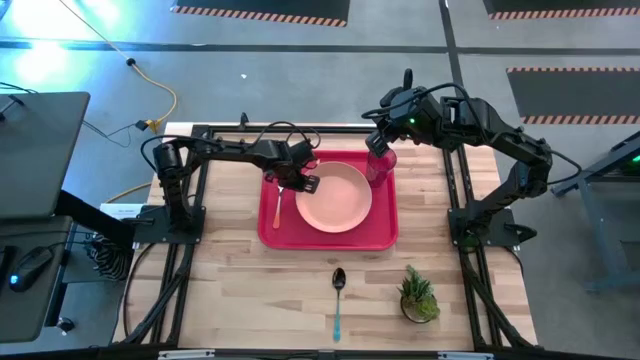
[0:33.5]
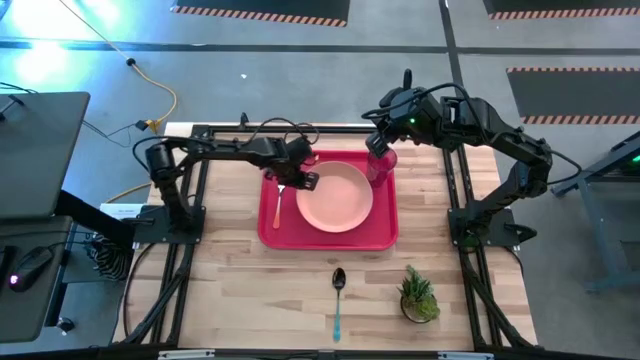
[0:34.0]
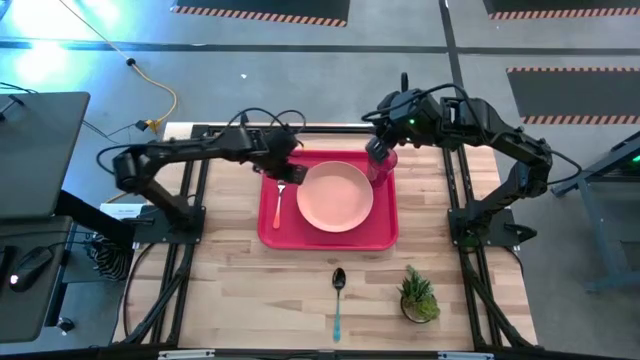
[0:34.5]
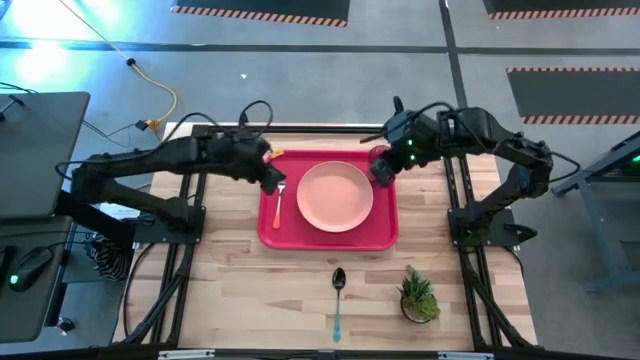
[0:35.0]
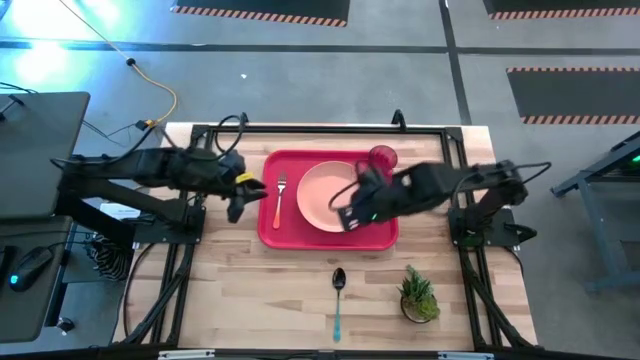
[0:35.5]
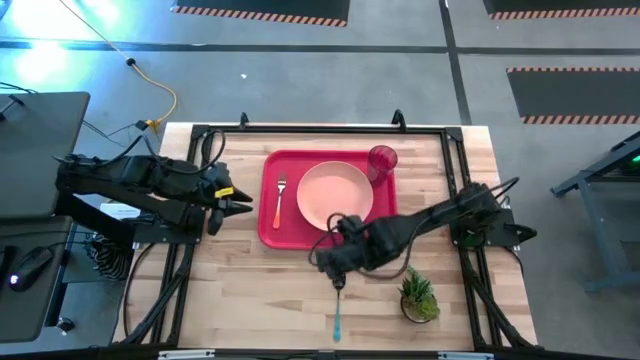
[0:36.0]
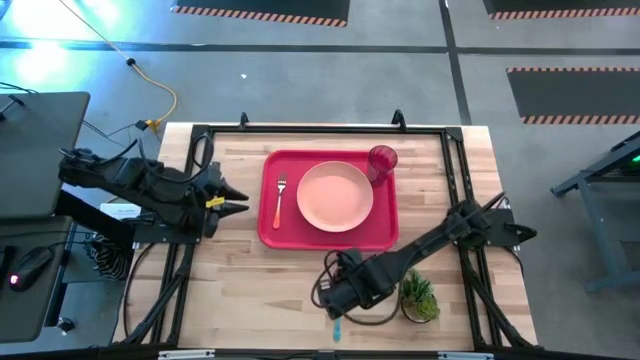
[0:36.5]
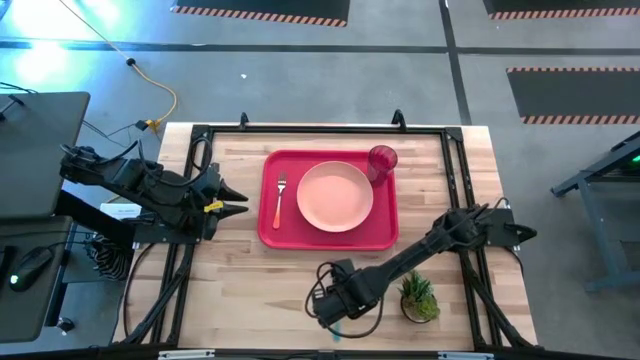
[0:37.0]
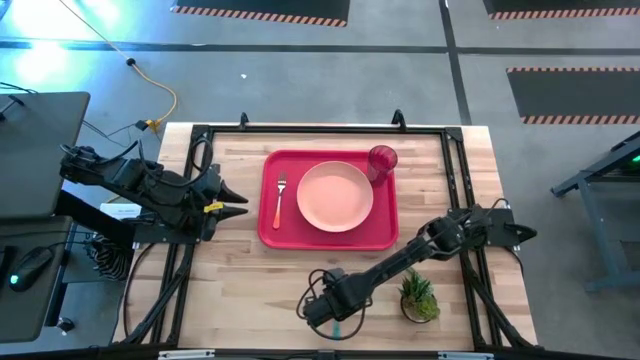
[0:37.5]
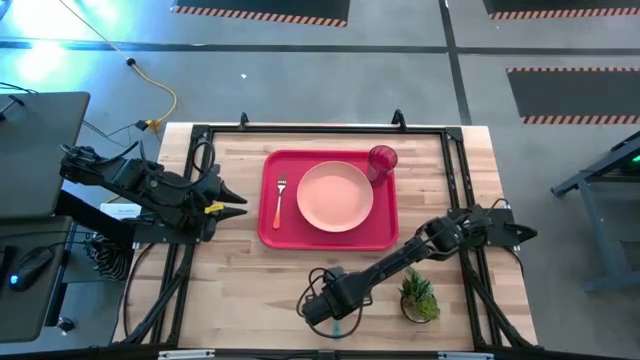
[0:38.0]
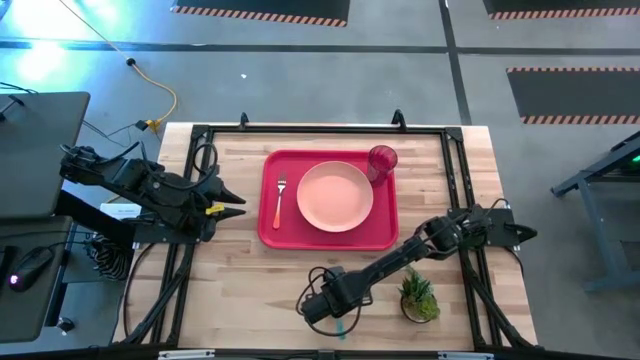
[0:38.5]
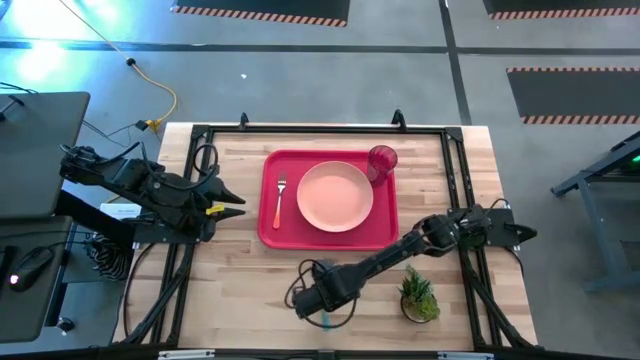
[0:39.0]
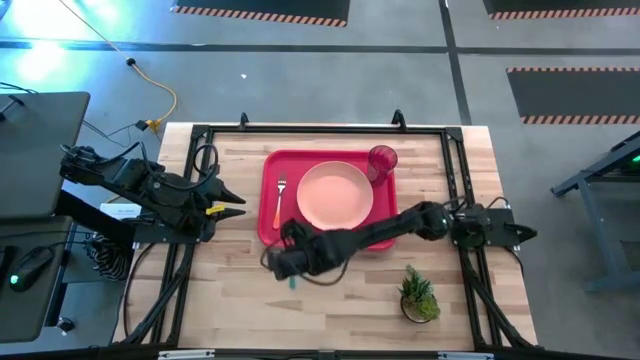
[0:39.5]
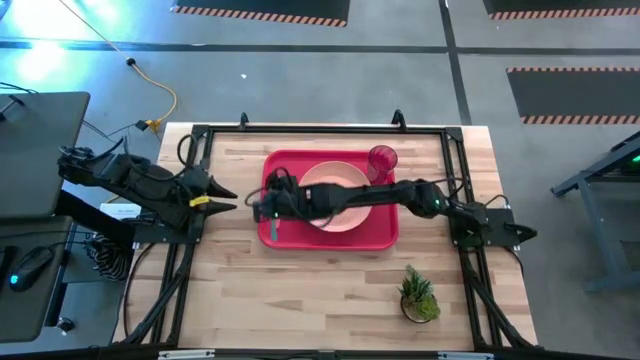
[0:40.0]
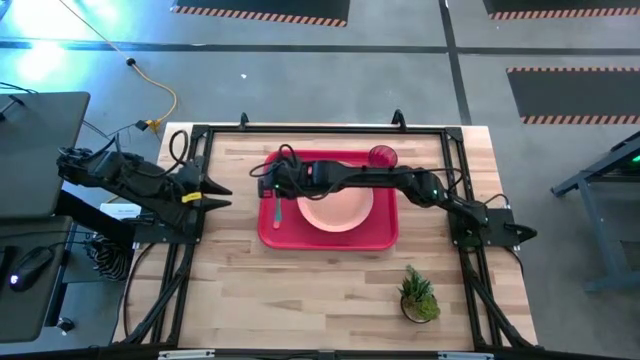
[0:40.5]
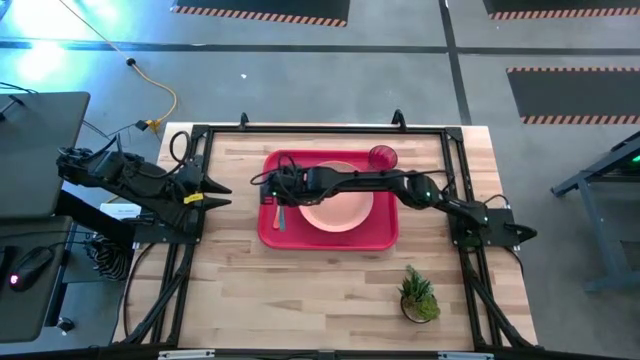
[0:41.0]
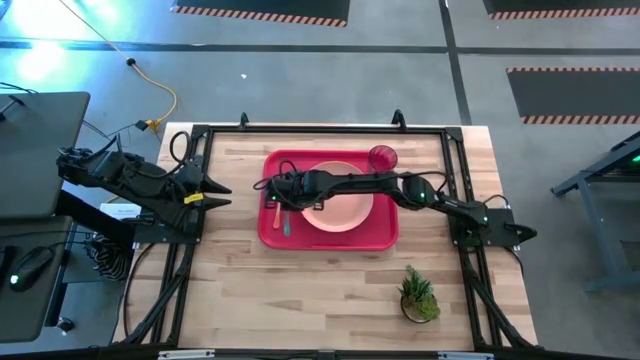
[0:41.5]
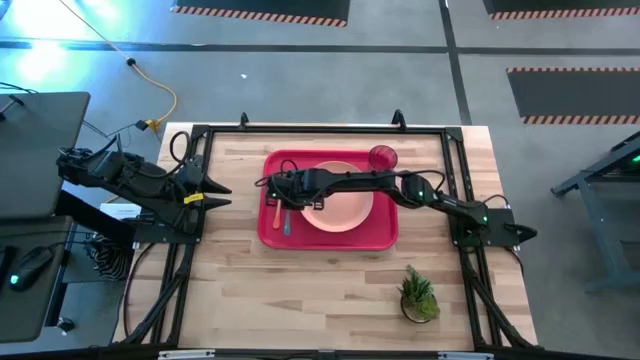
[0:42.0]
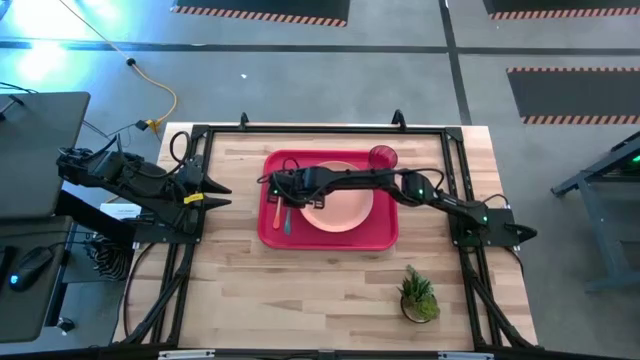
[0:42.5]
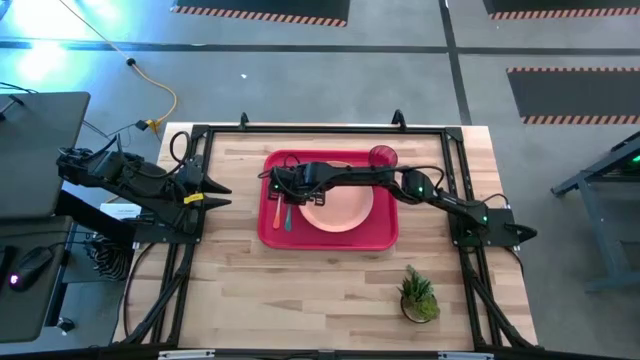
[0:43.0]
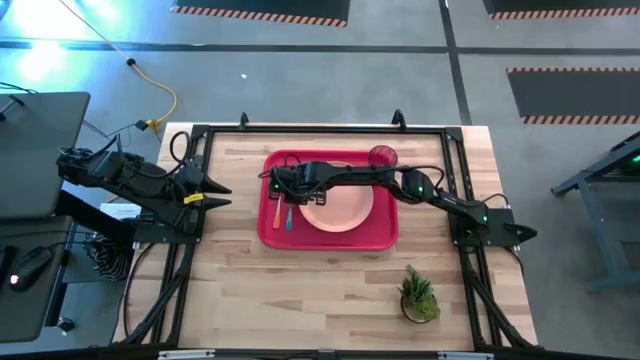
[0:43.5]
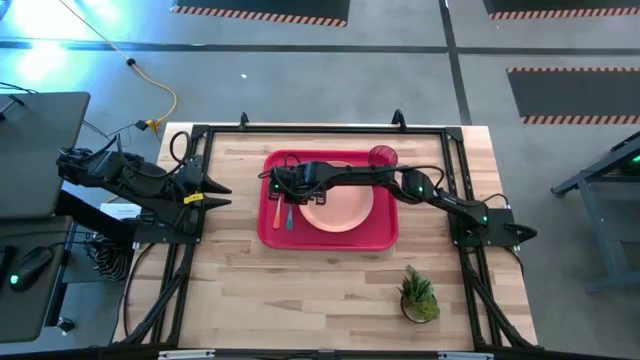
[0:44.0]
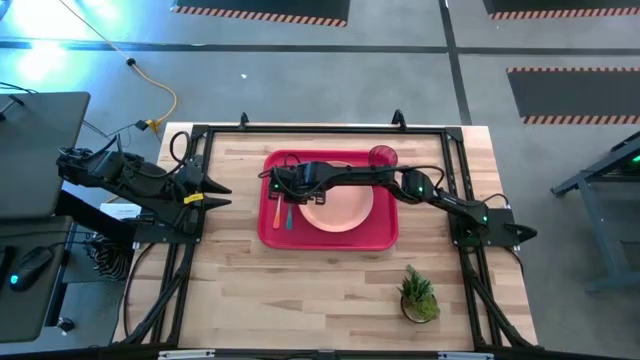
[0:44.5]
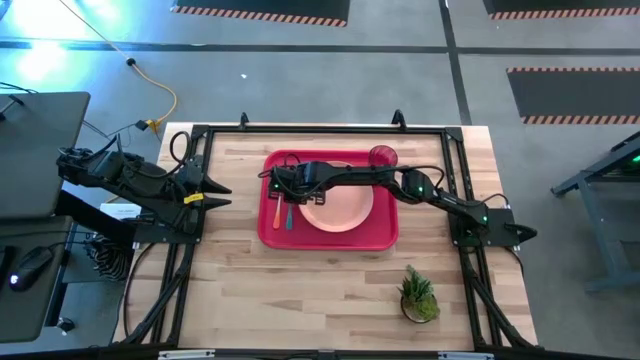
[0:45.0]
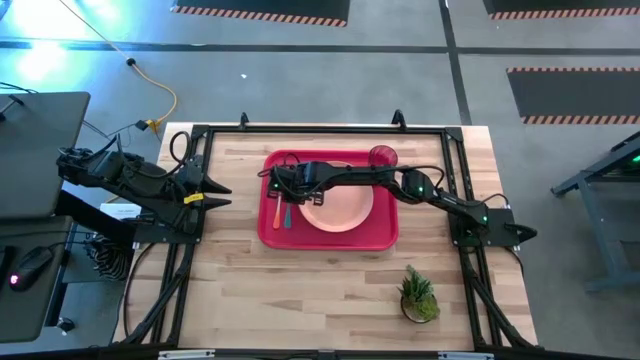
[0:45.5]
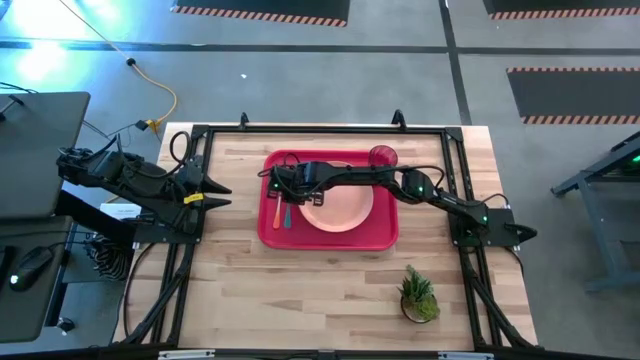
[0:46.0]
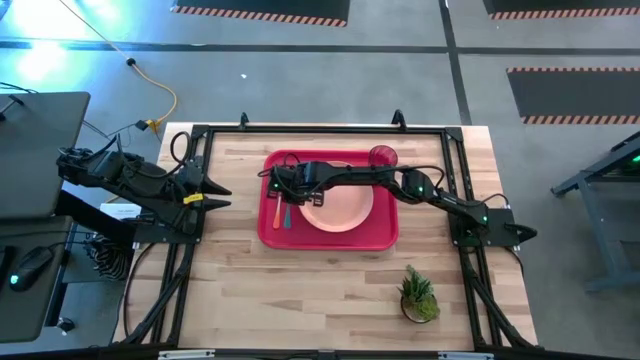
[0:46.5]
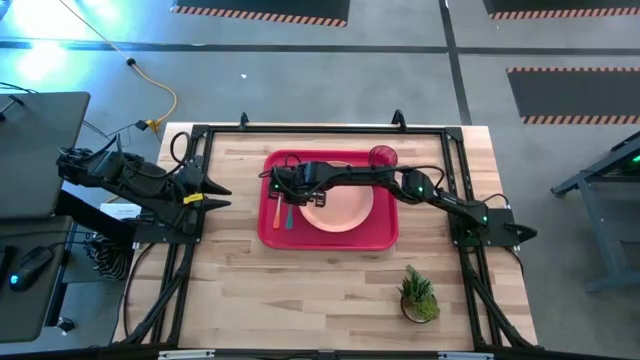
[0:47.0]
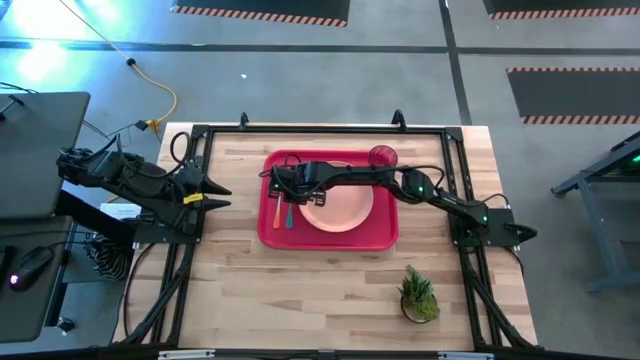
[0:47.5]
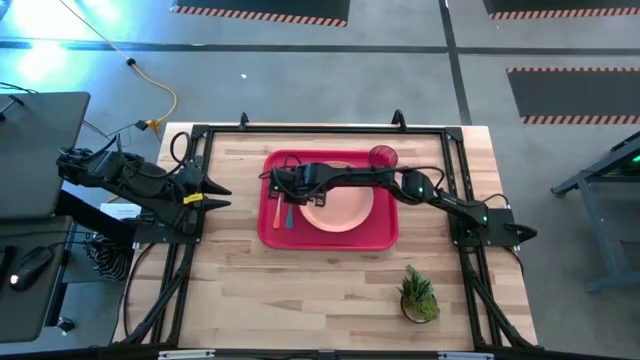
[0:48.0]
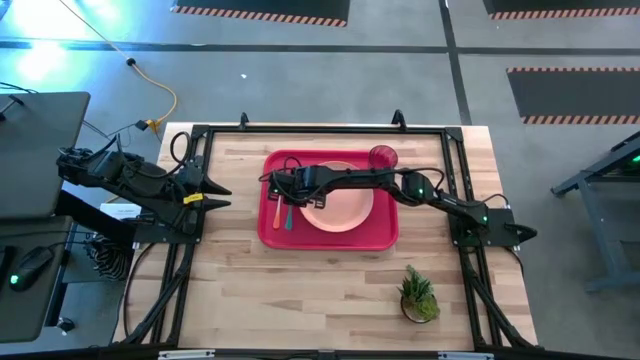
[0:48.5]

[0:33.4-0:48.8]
Task: Pick and place plate/cup/fork/spoon on tray
Put the spoon on the tray to the right of the fork

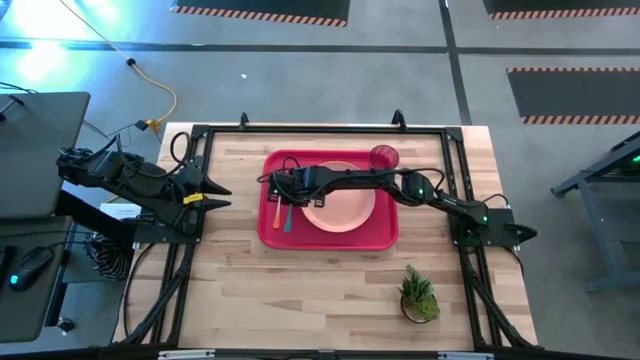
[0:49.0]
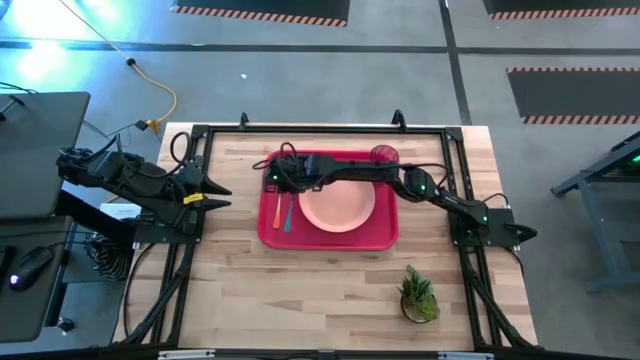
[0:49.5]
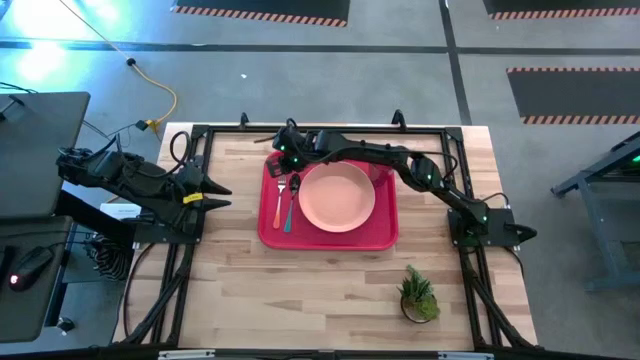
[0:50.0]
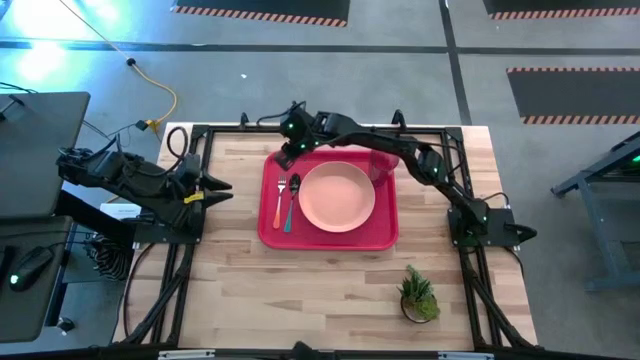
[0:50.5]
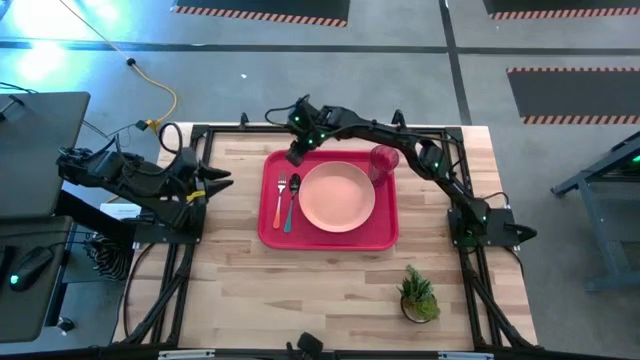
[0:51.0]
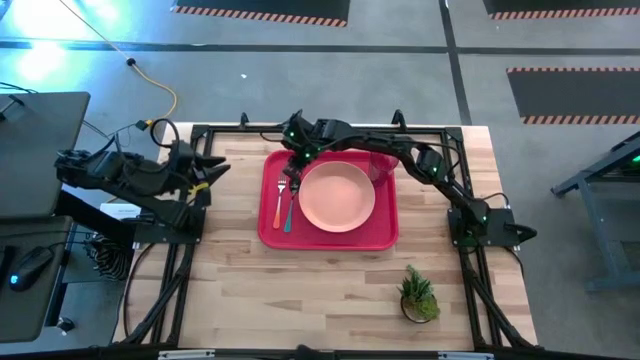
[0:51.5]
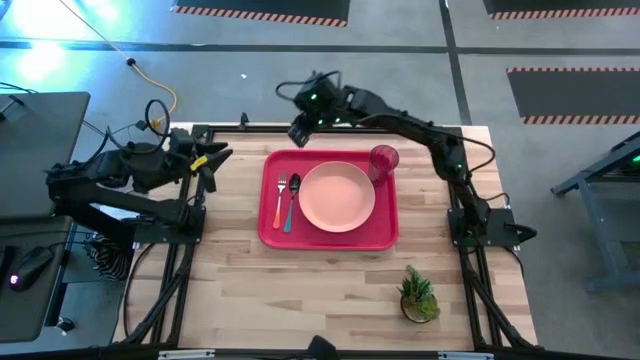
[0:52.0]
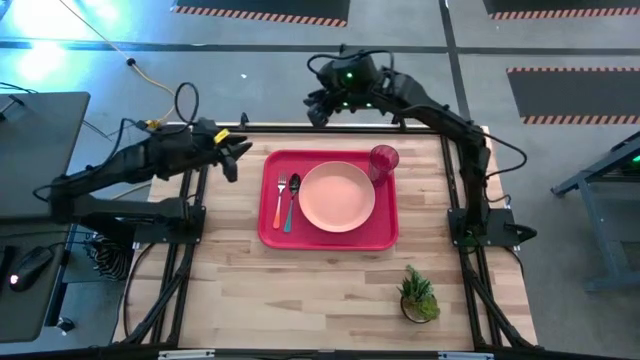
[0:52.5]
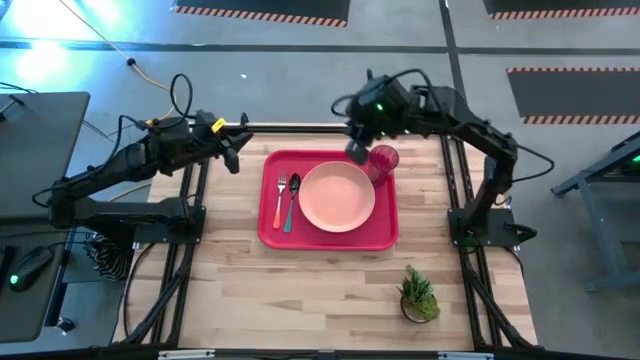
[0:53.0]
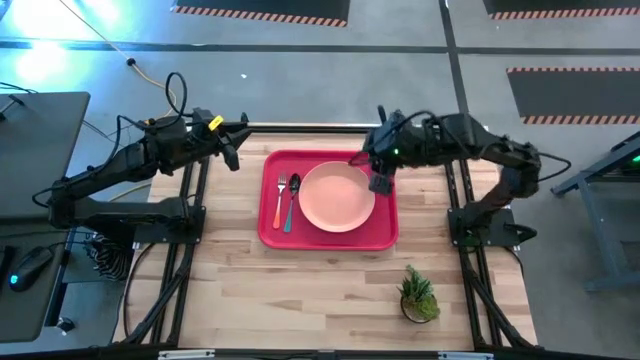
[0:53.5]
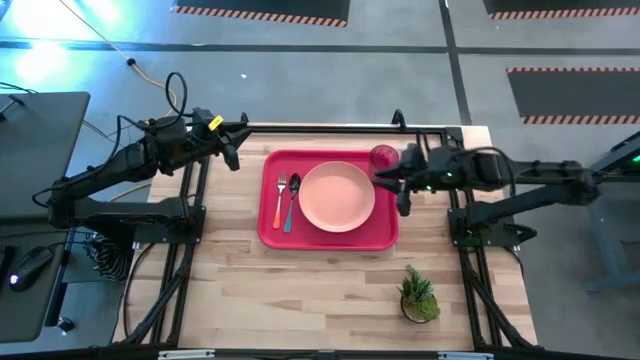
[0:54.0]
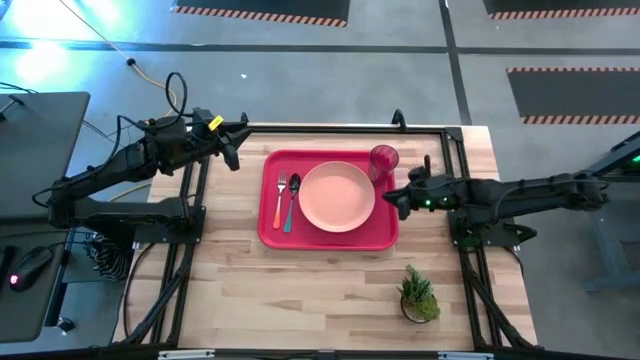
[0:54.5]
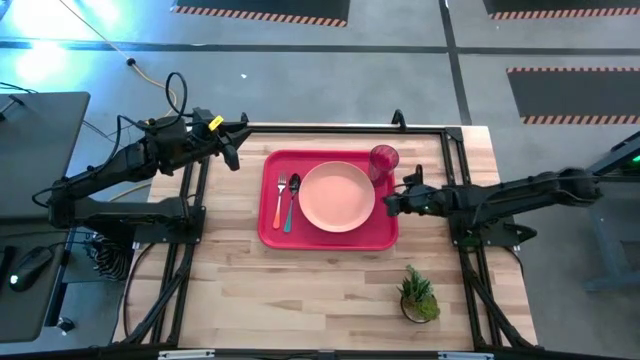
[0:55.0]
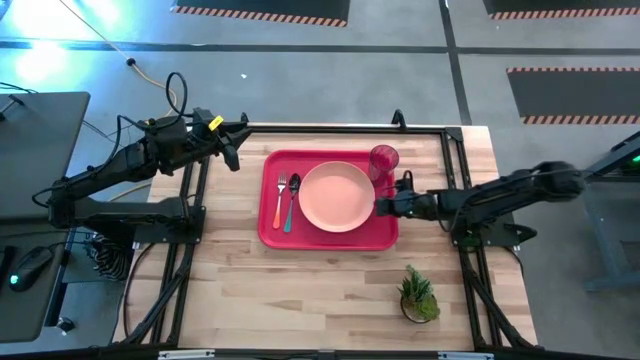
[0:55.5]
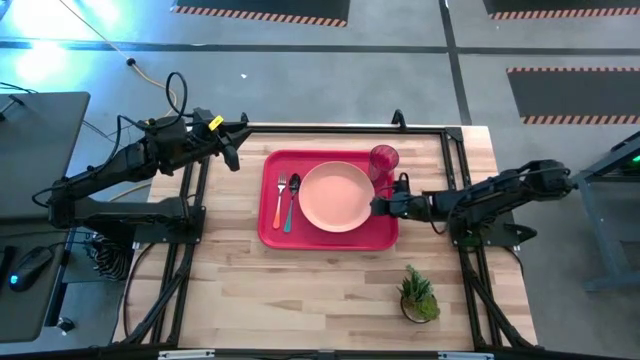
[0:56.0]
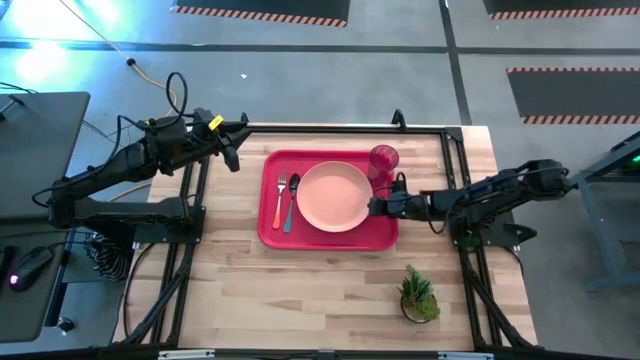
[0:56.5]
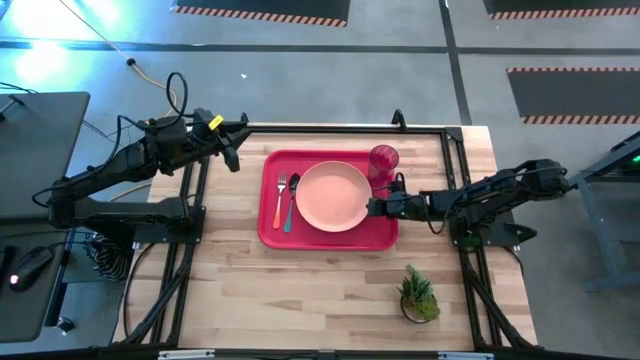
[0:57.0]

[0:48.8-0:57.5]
Adjust the plate that is on the serving tray
